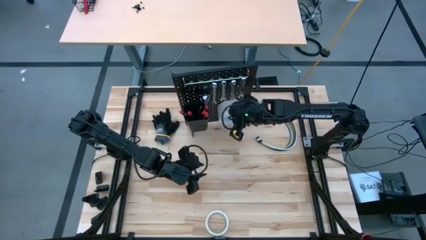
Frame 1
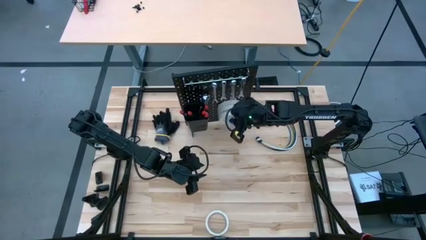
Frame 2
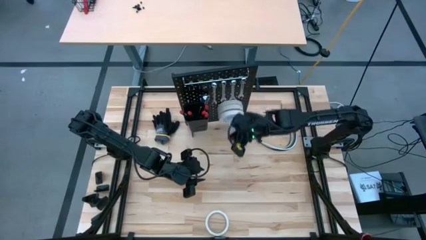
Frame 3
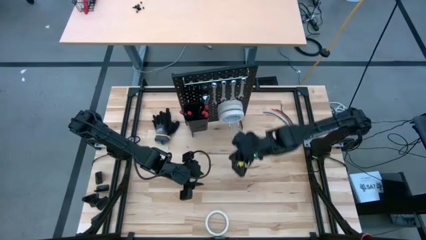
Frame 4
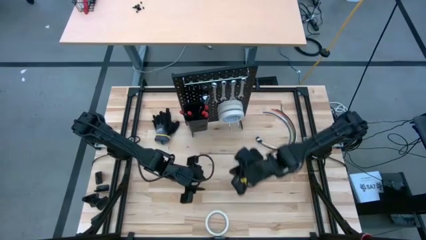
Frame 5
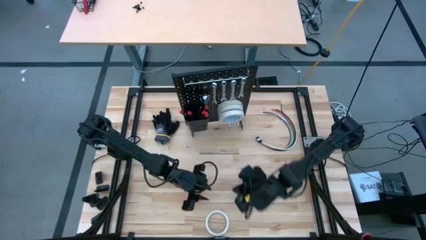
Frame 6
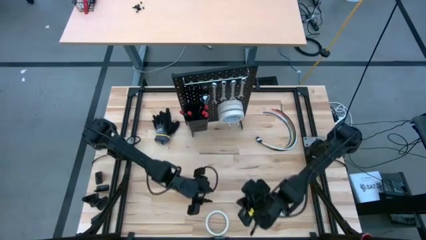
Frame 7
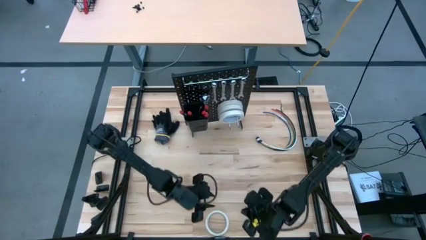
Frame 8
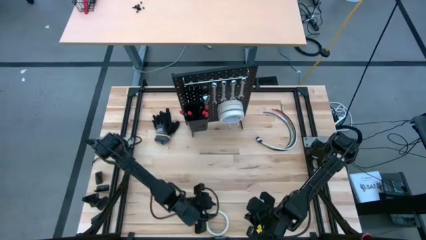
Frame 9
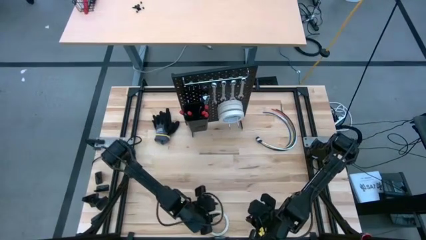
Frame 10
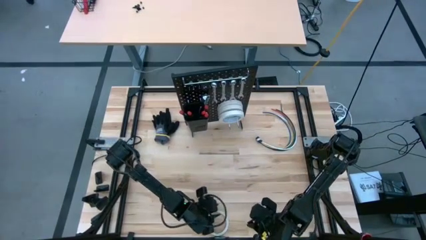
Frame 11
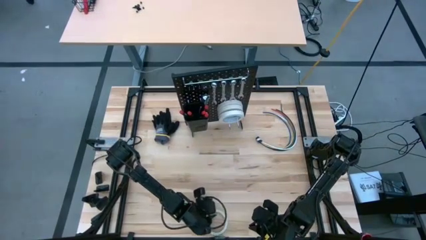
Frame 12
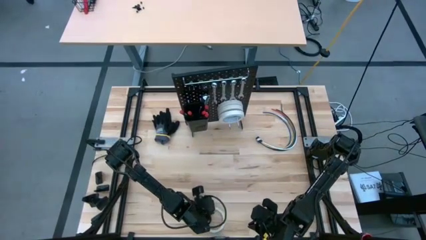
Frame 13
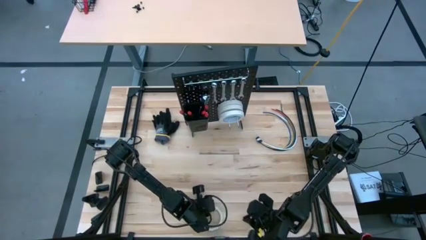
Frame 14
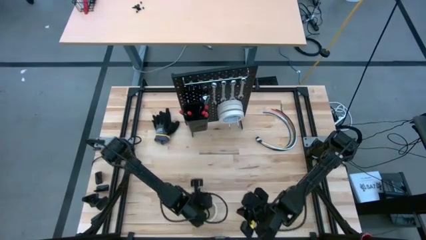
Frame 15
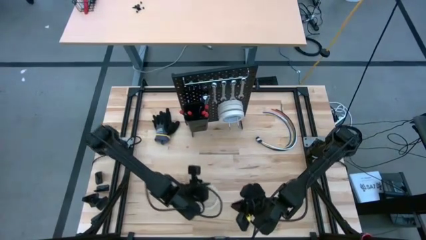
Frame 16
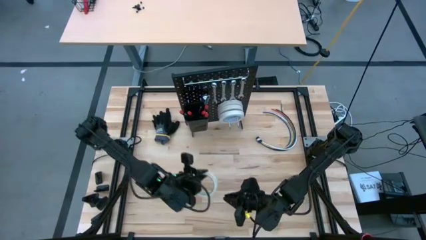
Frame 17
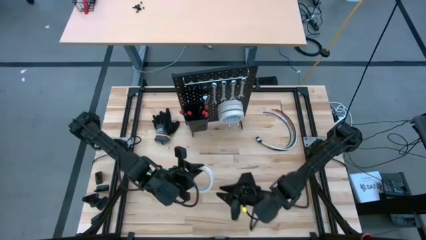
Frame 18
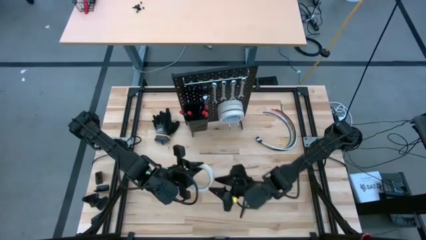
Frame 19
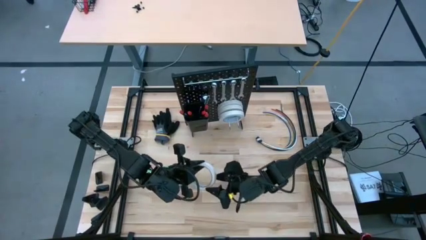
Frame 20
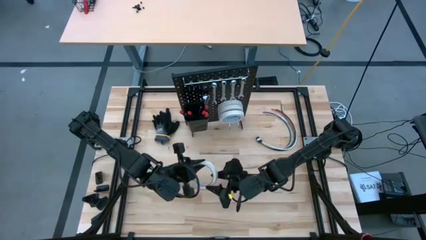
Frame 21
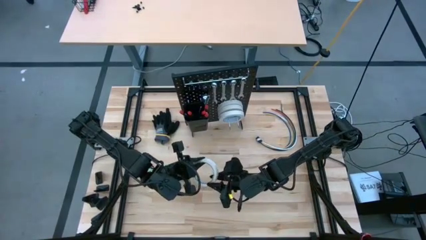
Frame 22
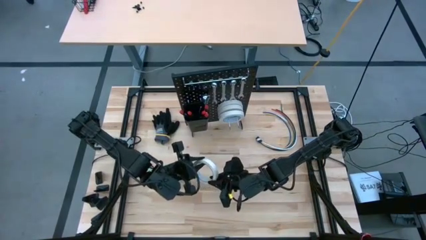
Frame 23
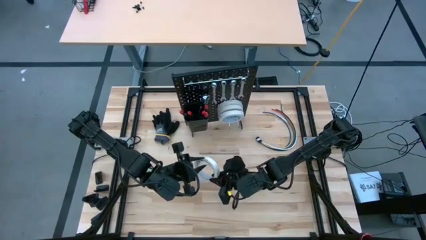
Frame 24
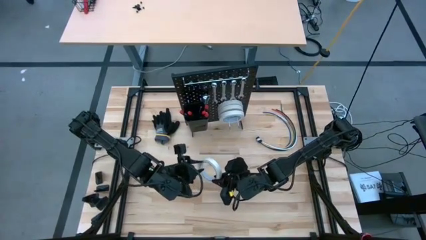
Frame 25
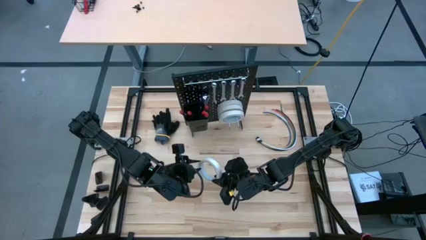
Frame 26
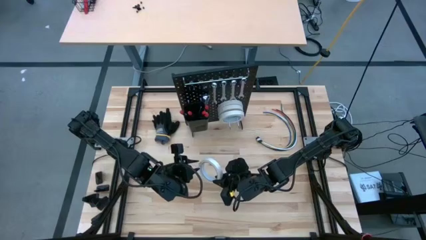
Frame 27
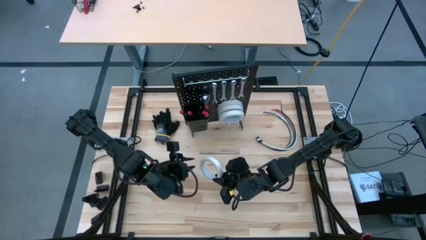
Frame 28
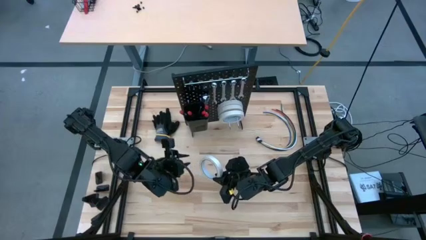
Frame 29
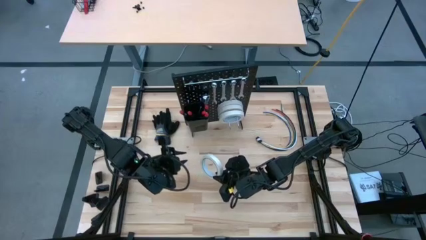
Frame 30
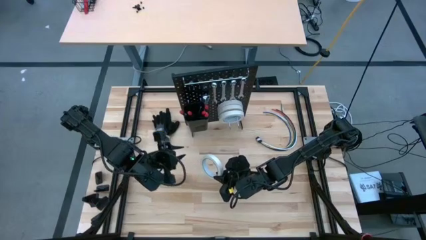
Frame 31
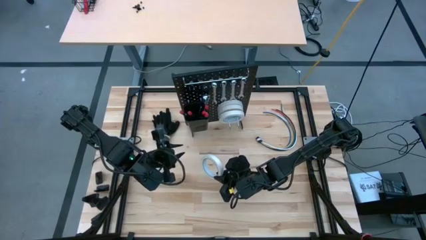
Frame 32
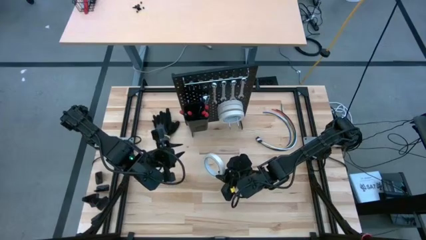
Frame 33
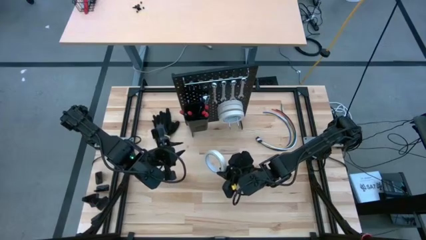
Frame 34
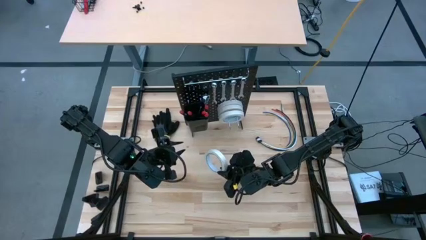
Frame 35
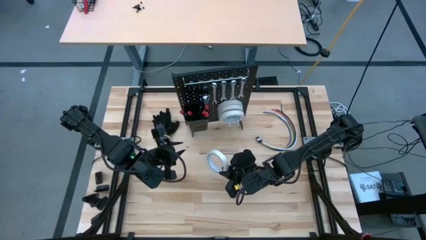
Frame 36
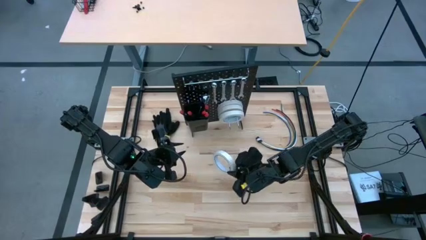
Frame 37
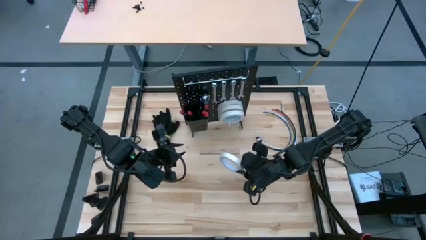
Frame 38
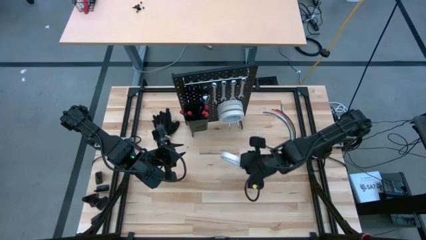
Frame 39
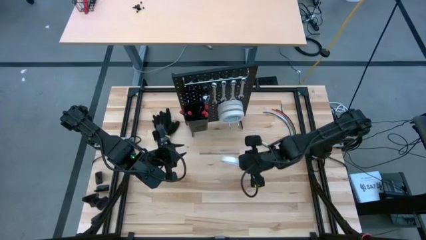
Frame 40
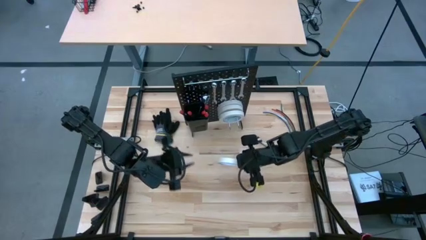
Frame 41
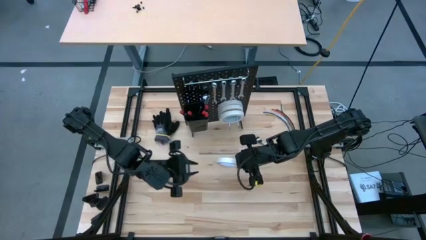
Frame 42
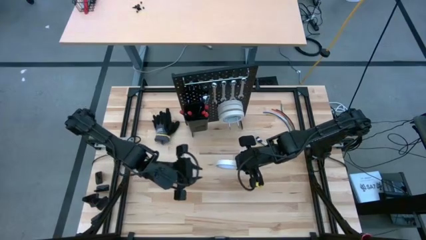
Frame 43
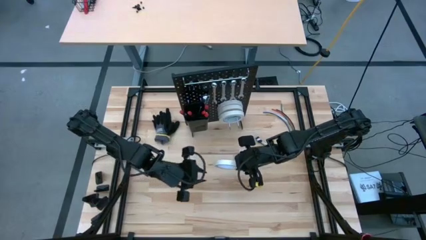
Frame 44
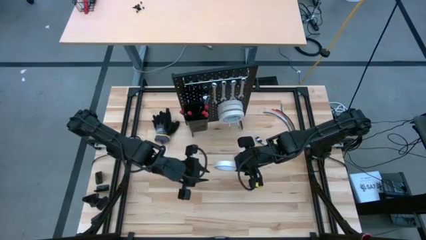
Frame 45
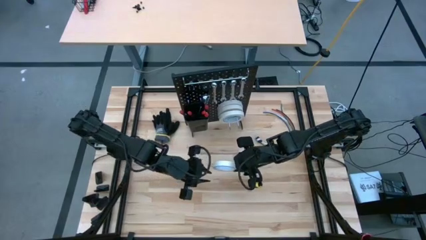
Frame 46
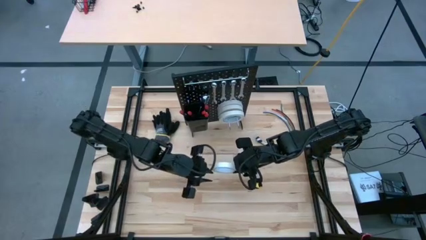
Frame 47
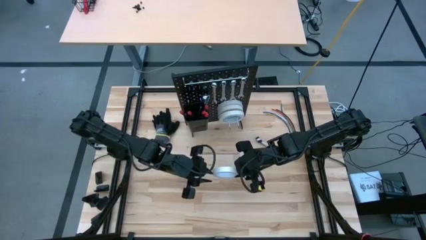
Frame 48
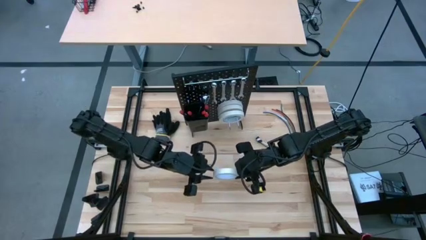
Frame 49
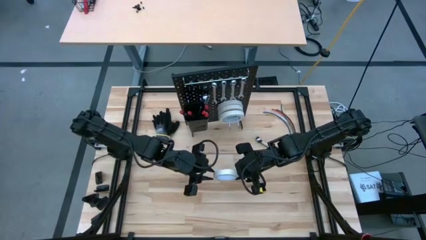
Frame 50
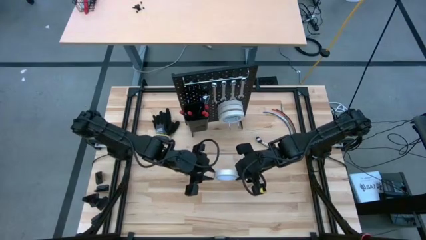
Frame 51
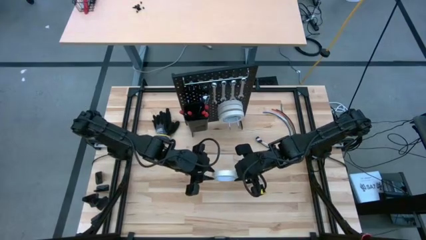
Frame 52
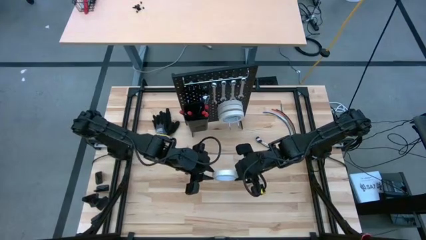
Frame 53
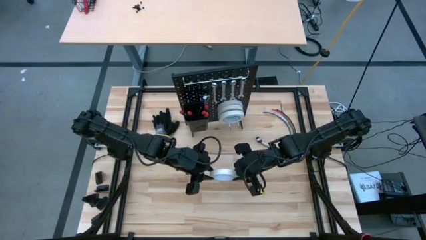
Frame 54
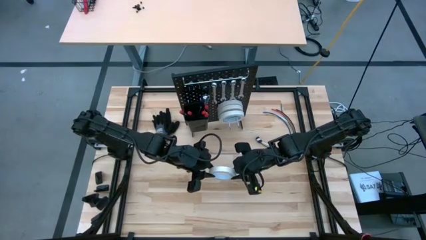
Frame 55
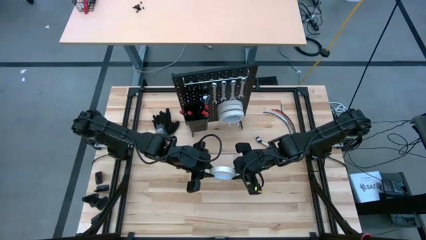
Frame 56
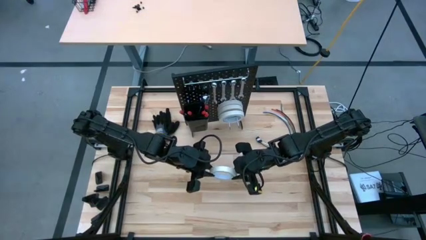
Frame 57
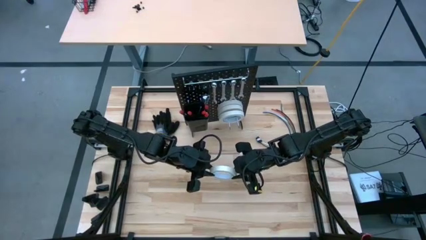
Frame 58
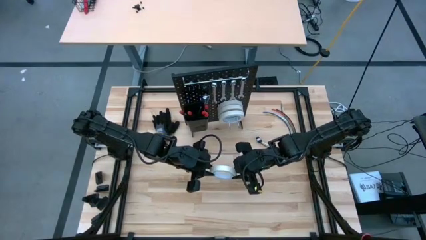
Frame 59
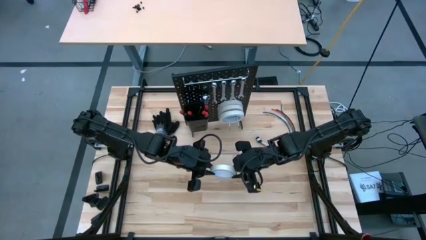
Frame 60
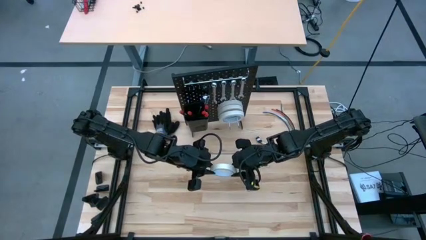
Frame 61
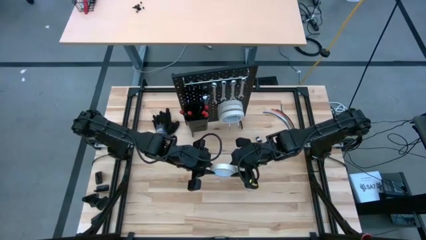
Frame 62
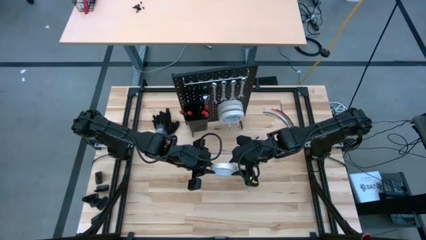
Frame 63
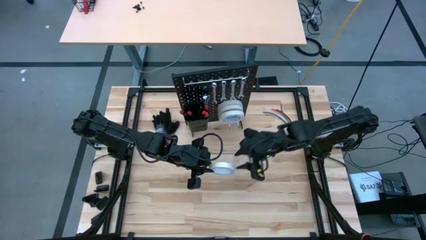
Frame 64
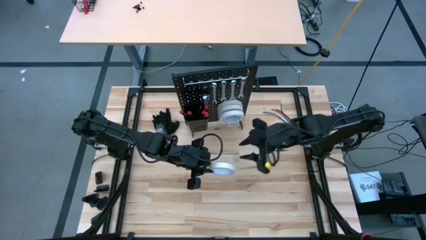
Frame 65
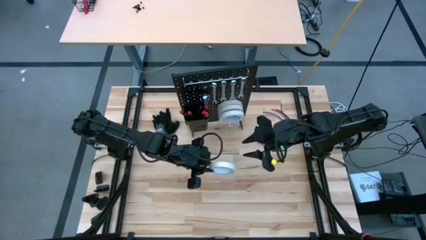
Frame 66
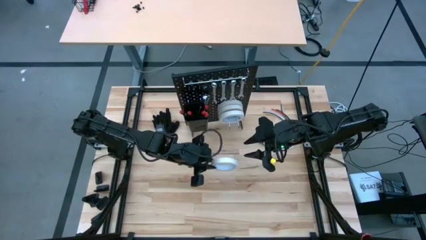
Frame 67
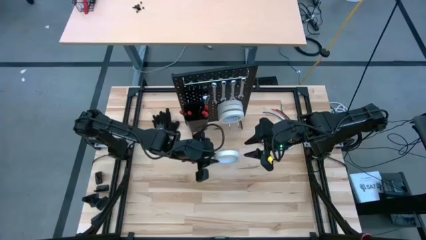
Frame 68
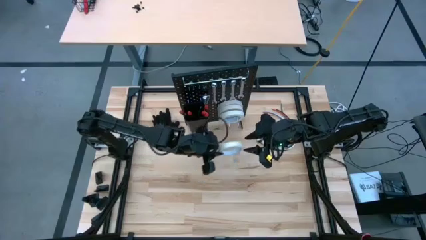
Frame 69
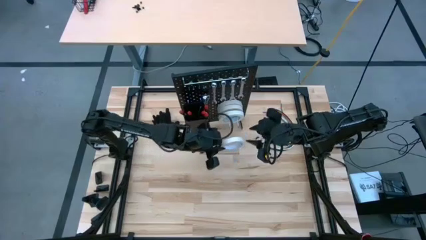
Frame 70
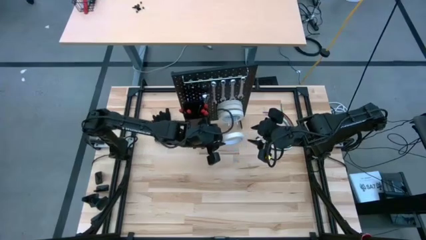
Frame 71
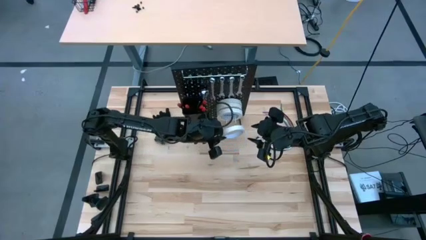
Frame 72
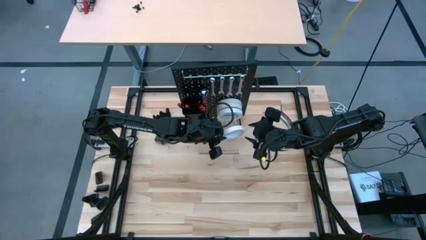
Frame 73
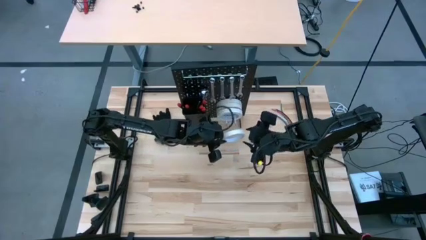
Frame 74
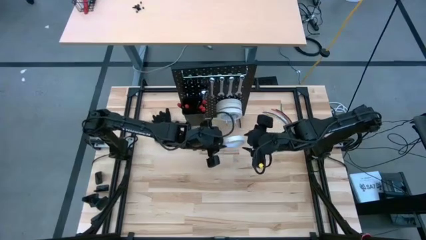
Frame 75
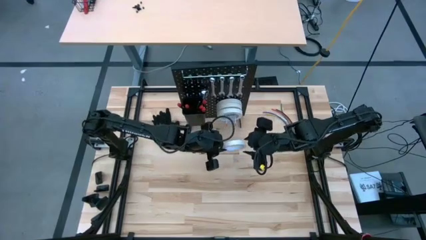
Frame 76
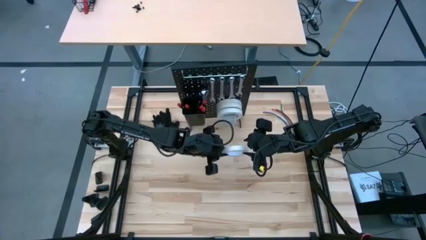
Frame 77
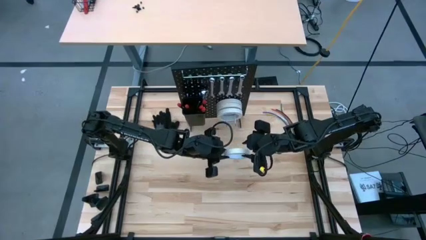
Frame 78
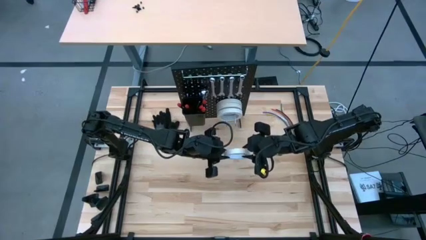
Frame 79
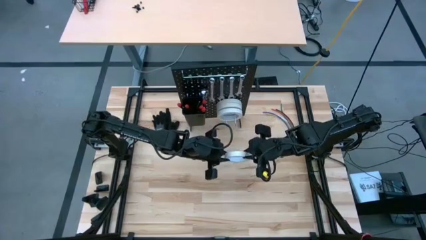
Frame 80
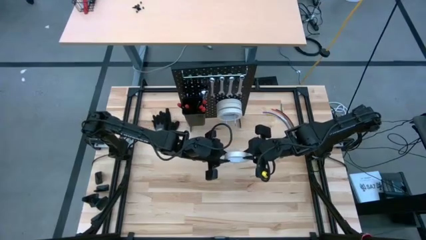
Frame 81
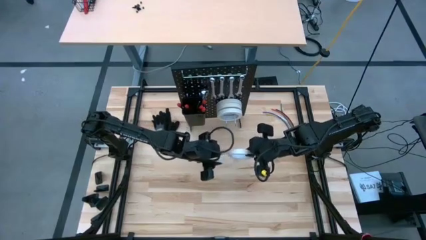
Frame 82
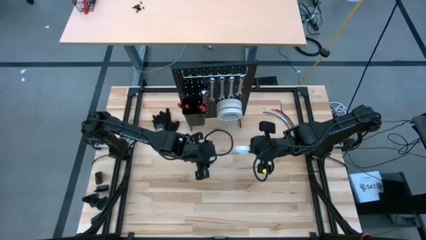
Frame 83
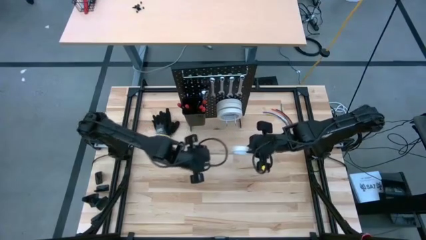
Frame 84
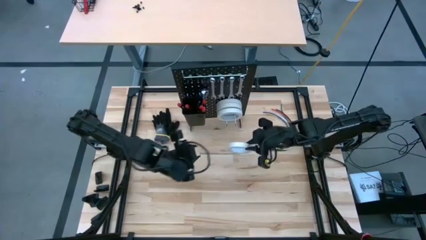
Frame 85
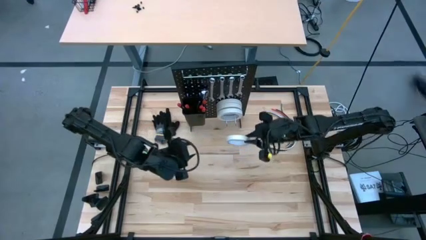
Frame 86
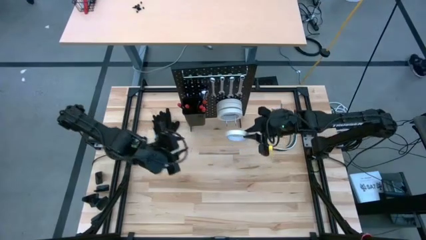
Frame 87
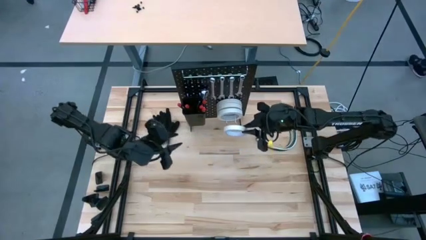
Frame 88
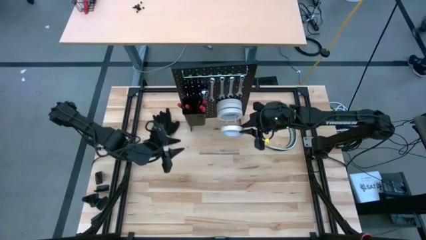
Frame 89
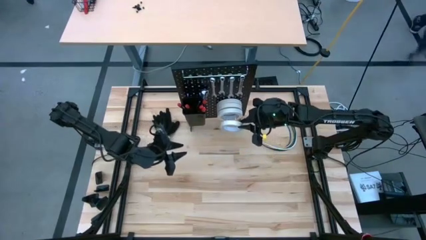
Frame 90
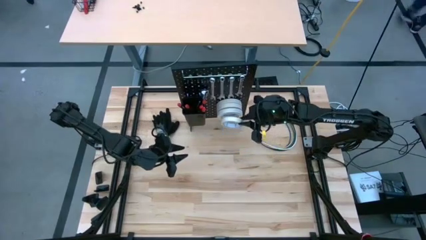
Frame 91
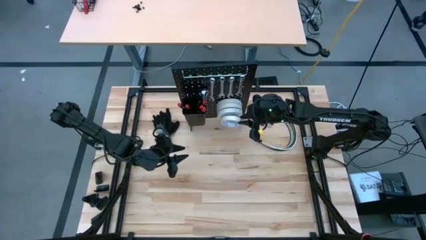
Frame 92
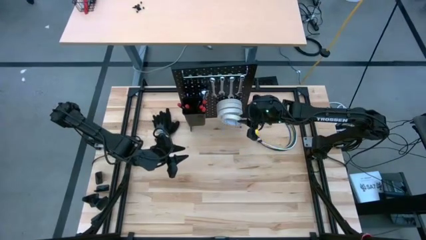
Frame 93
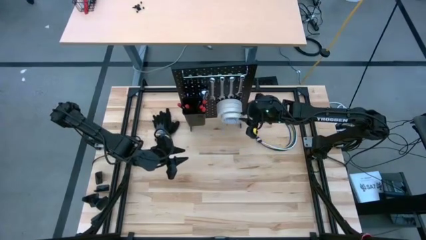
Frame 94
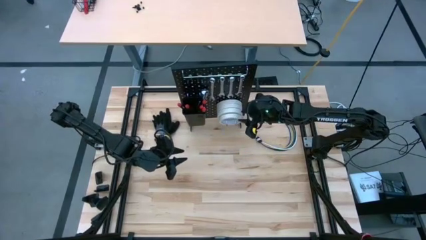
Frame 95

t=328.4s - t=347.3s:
Task: Hang tools onto peg board
Hang the white masking tape on the peg board
